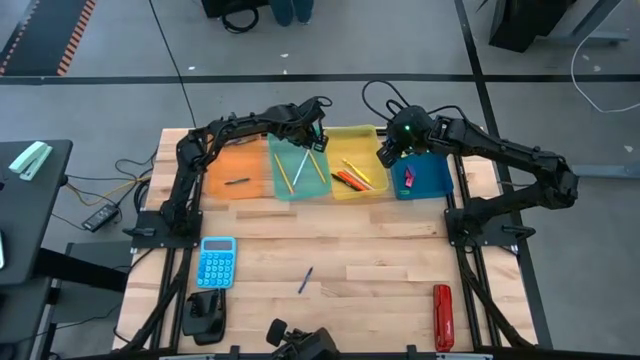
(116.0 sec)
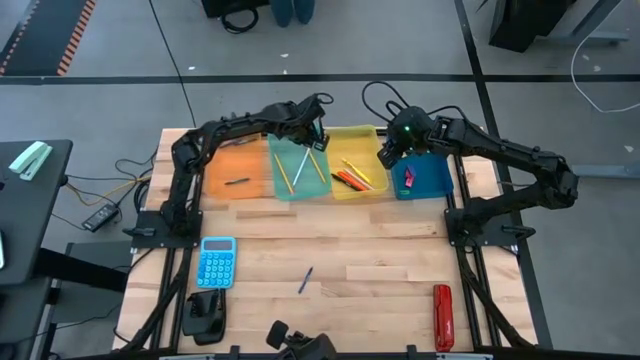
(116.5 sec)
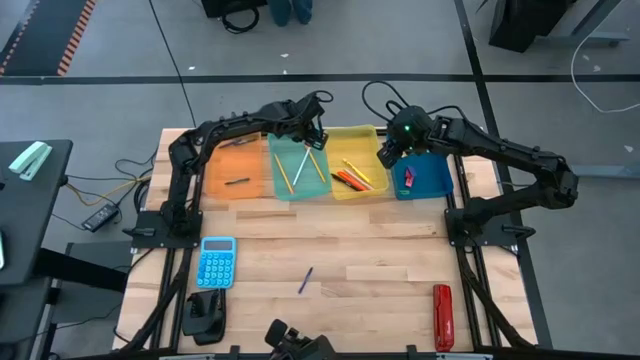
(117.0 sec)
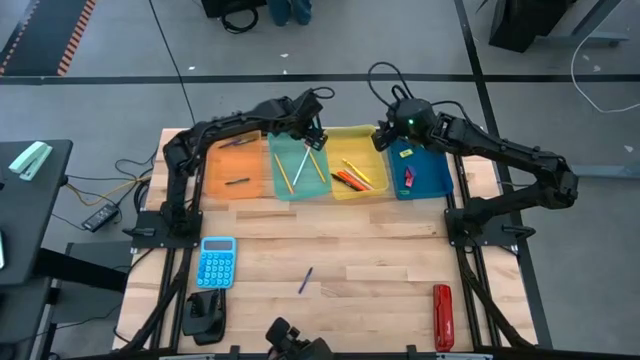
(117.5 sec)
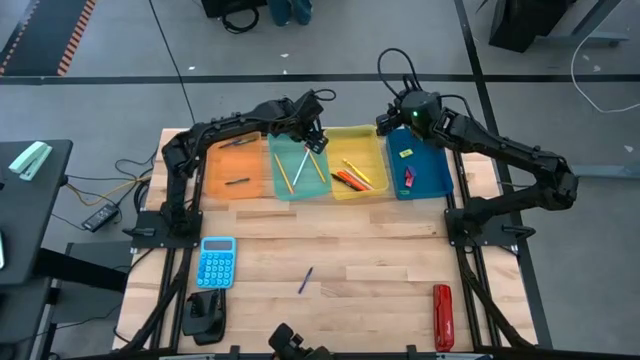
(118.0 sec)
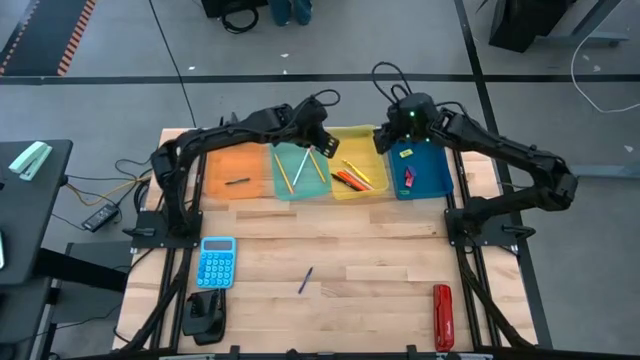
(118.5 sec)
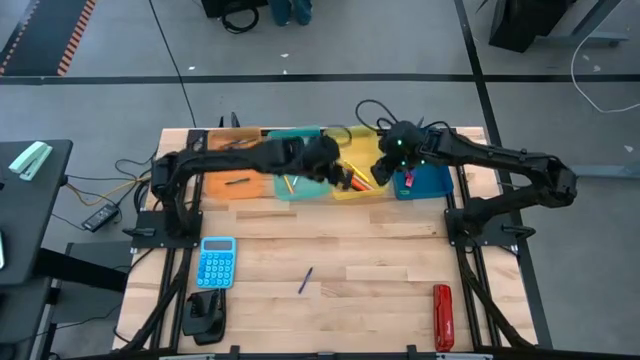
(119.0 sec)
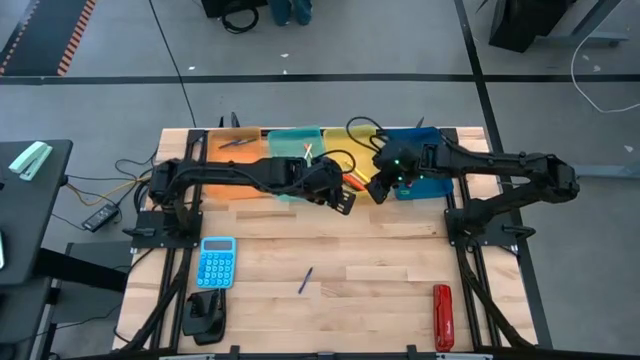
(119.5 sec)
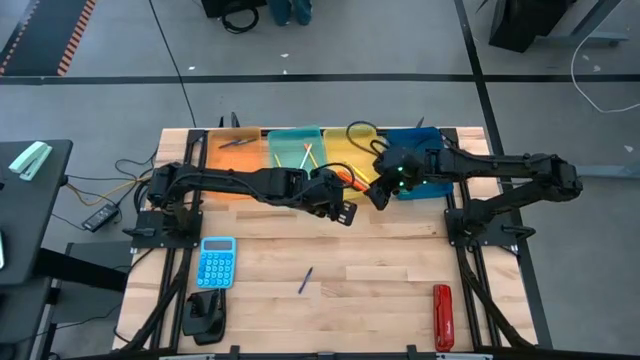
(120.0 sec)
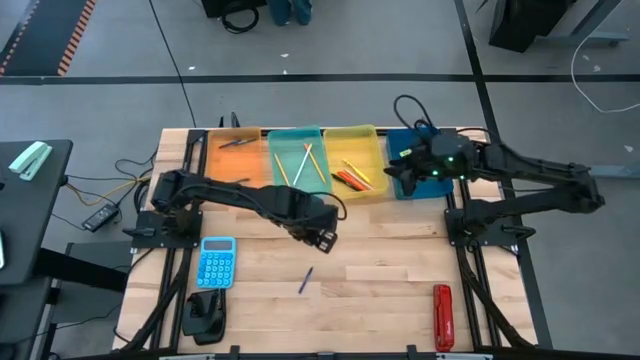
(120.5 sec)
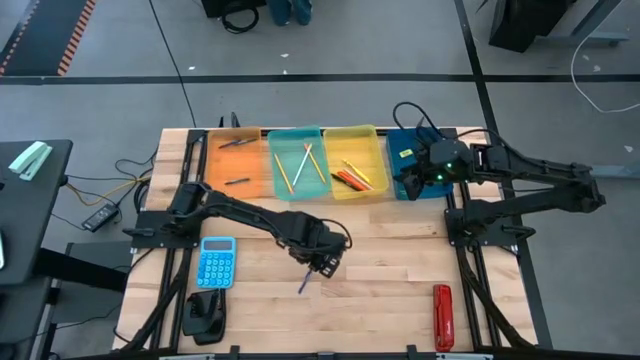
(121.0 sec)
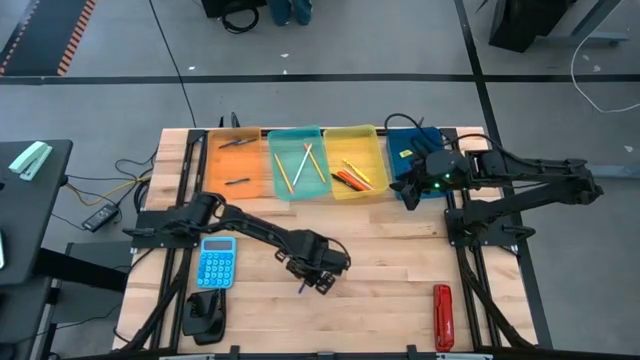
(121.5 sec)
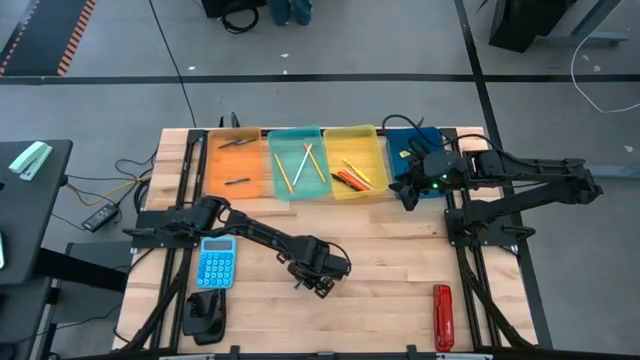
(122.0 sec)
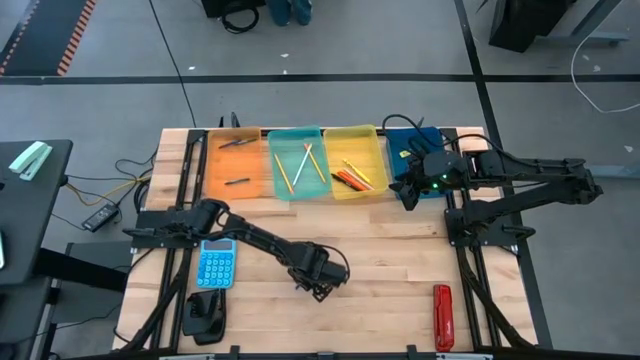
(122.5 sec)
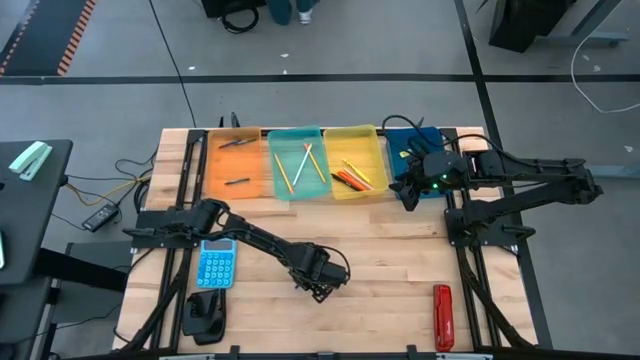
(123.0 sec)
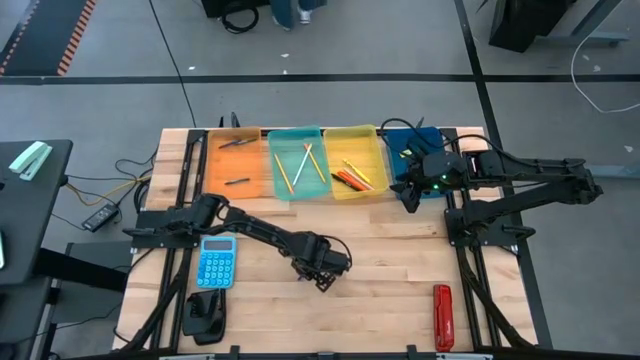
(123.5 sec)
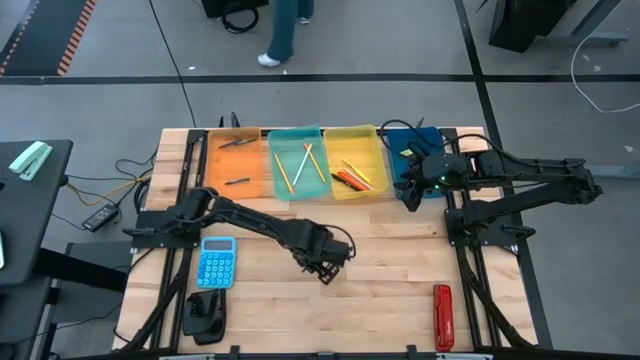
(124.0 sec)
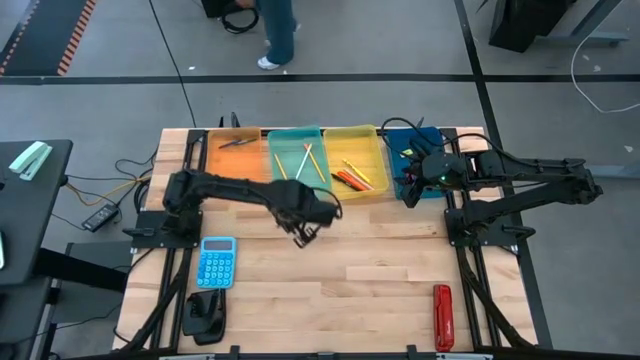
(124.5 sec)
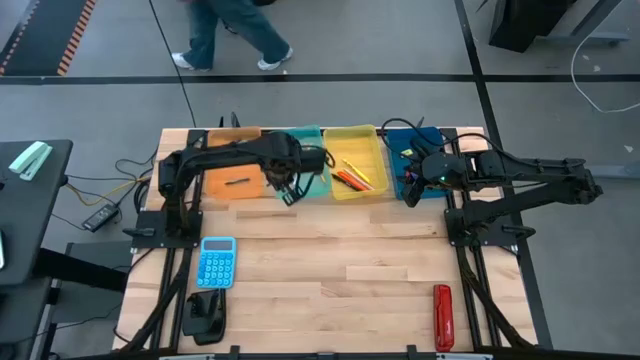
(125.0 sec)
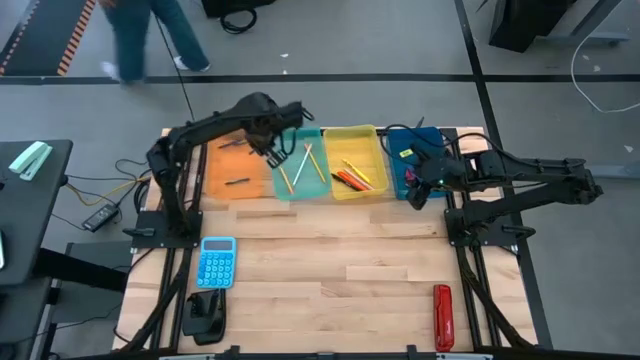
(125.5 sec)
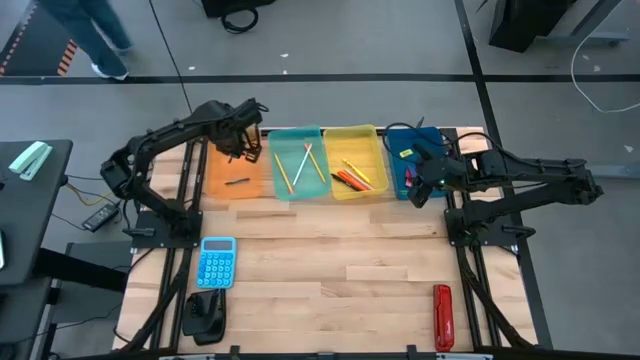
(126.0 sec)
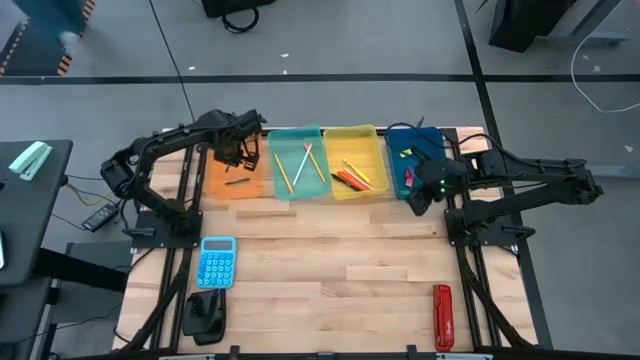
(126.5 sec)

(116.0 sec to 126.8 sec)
Task: Sort crayons/erasers/pens/pencils in bins
Put the blue crayon into the orange bin

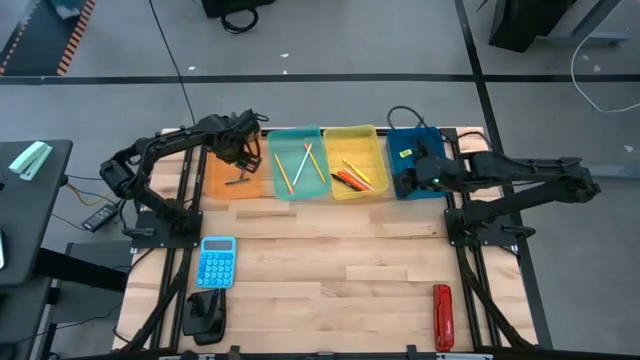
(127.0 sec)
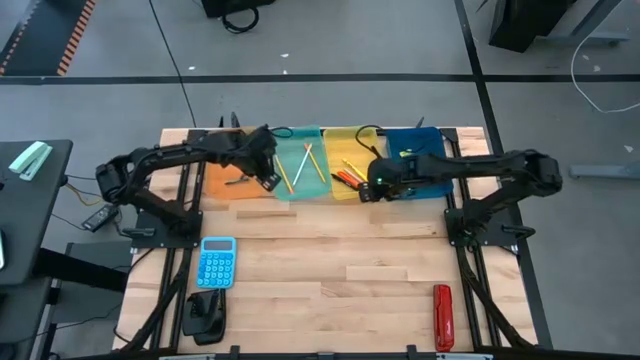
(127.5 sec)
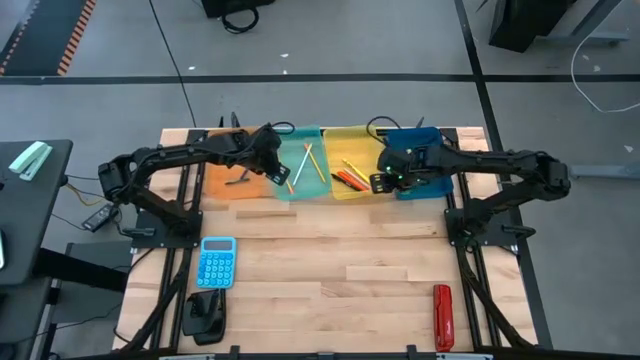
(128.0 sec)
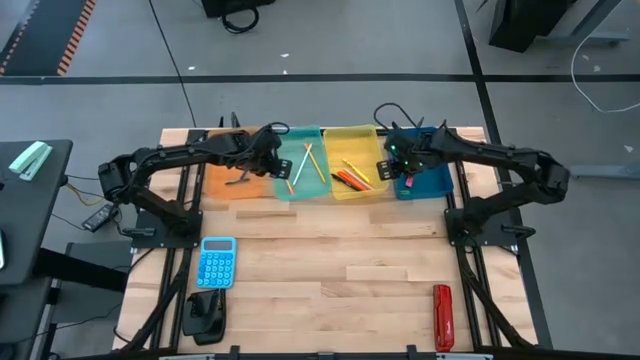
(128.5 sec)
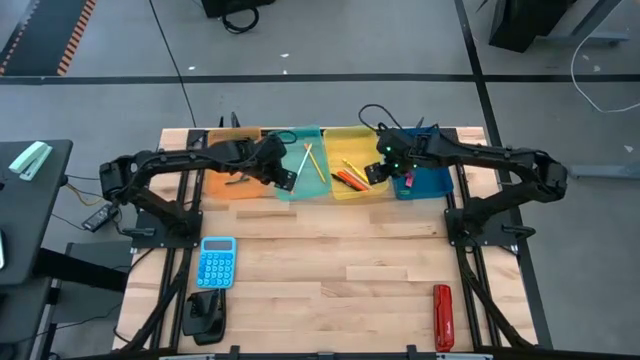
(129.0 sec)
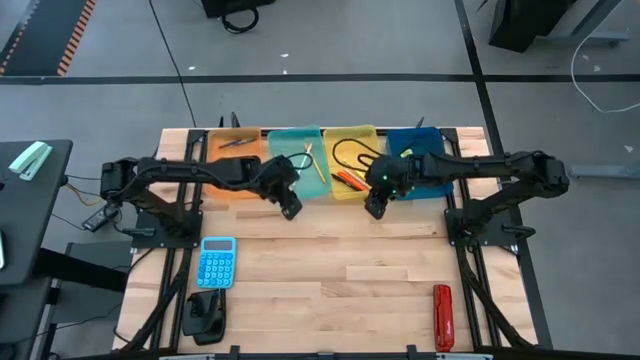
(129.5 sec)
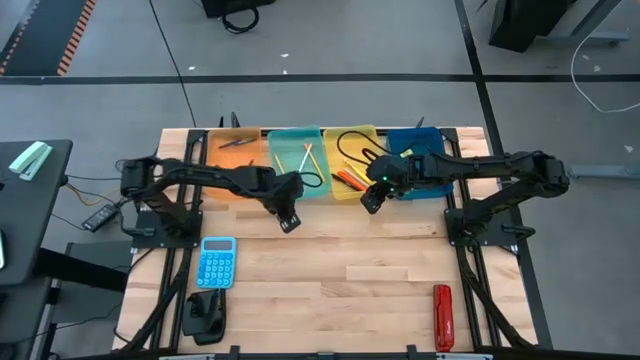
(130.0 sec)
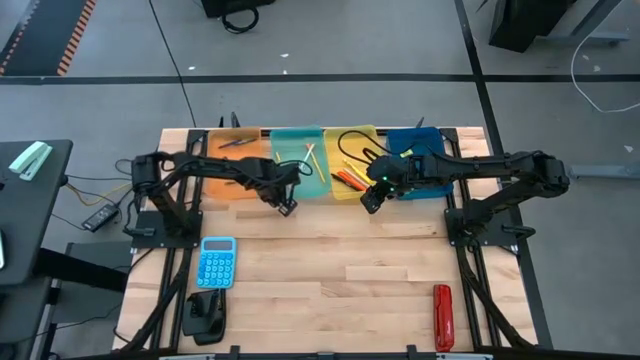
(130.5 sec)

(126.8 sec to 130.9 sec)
Adjust the green bin

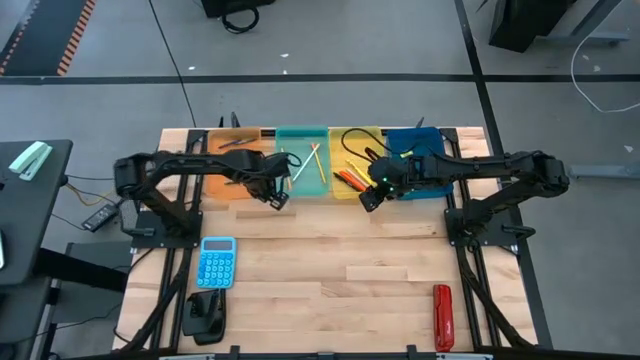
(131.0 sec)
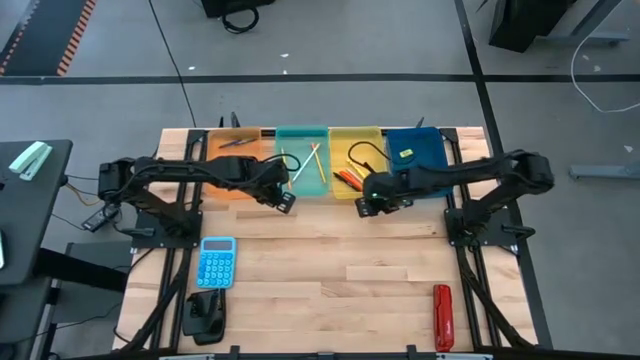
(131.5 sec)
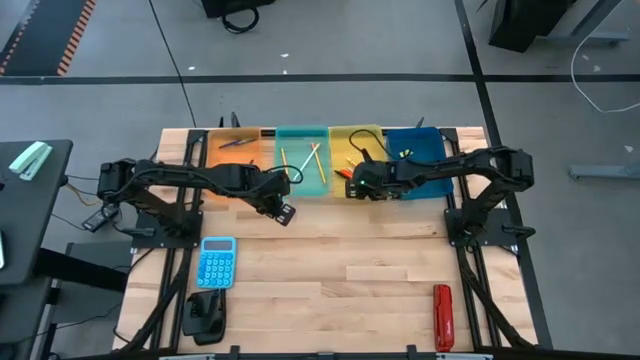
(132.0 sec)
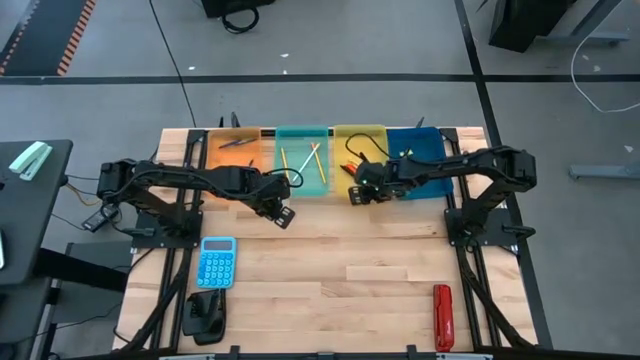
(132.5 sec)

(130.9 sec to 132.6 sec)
Adjust the yellow bin

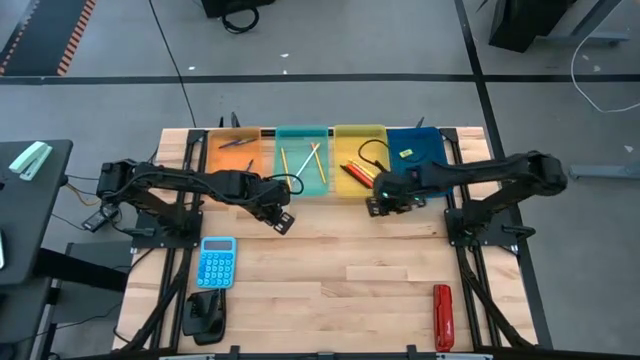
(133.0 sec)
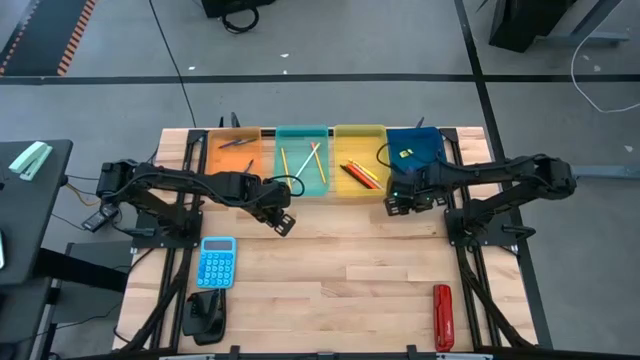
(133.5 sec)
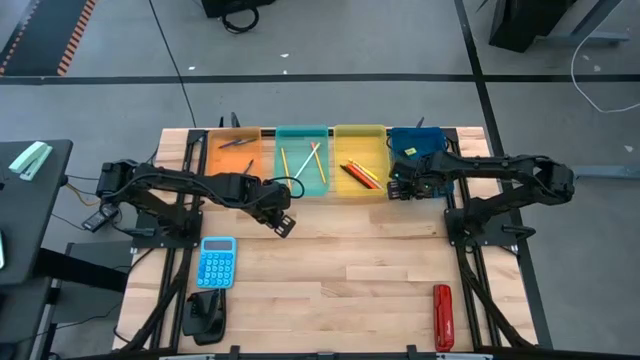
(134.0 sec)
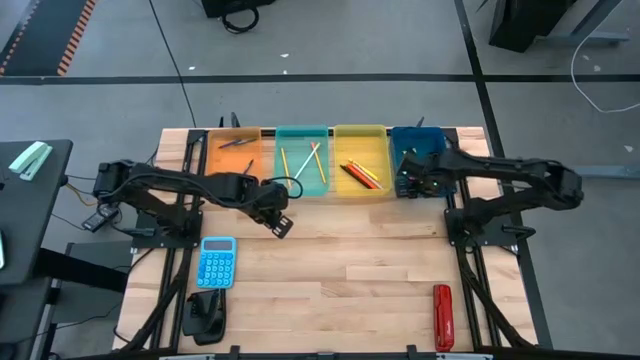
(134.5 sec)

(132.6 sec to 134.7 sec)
Adjust the blue bin

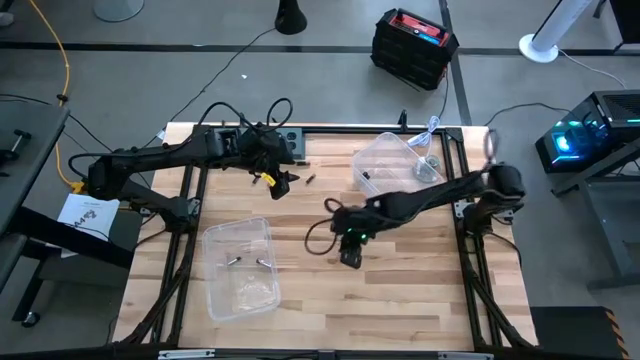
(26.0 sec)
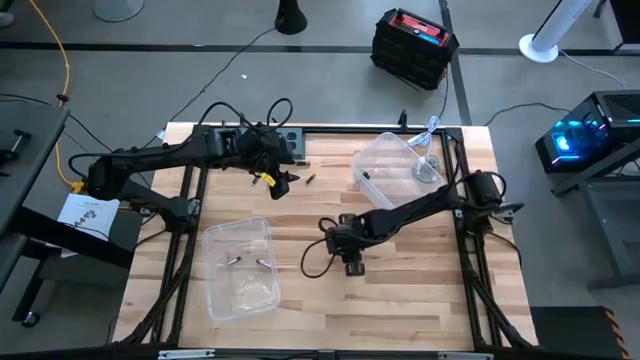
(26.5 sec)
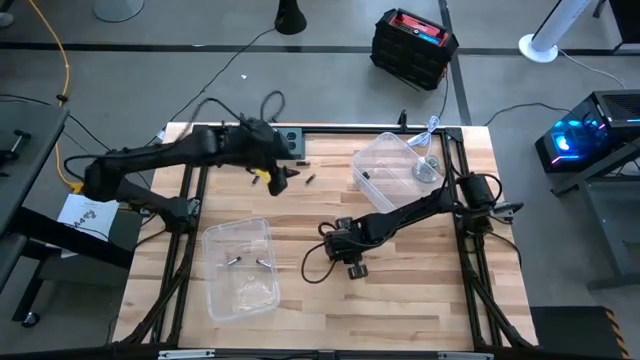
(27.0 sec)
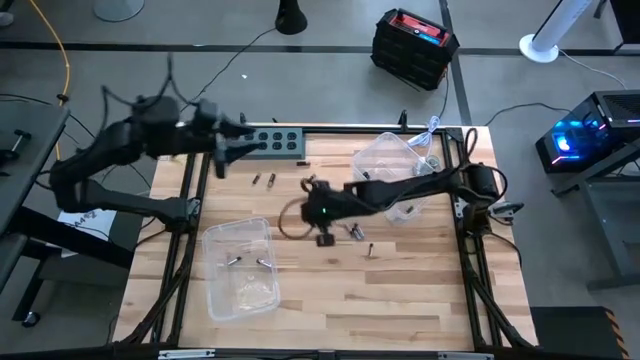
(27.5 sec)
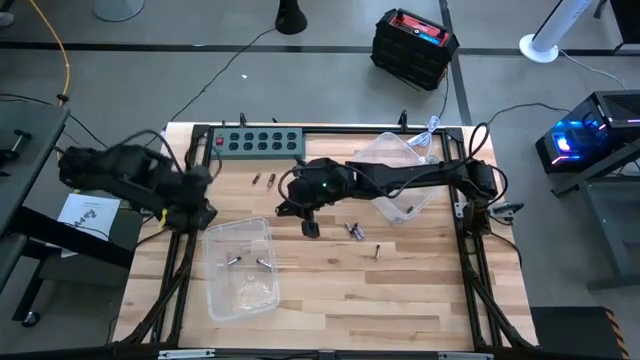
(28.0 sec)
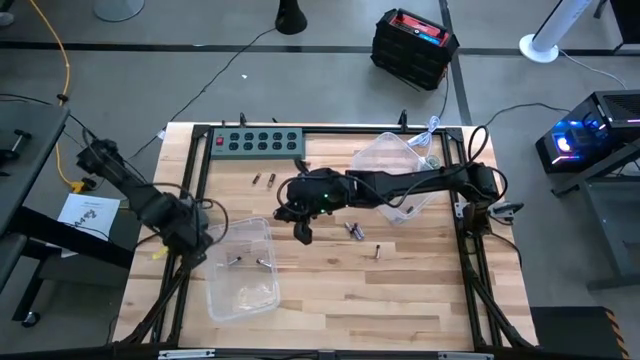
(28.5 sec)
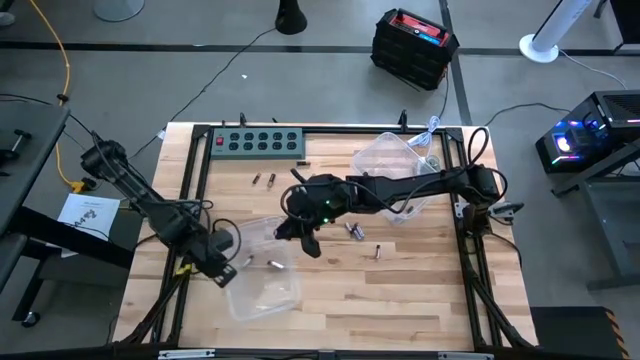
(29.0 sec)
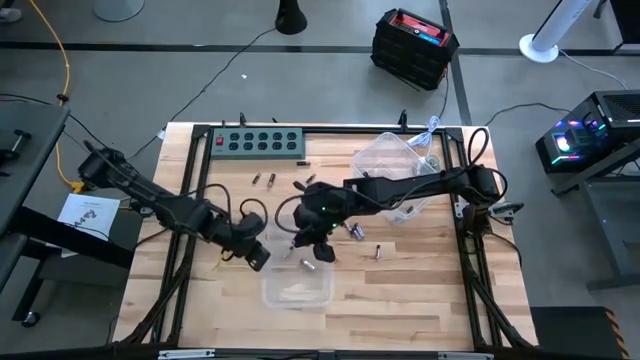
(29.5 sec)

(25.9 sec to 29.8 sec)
Task: Sort batteries
Put the silver battery into the left transparent bin
